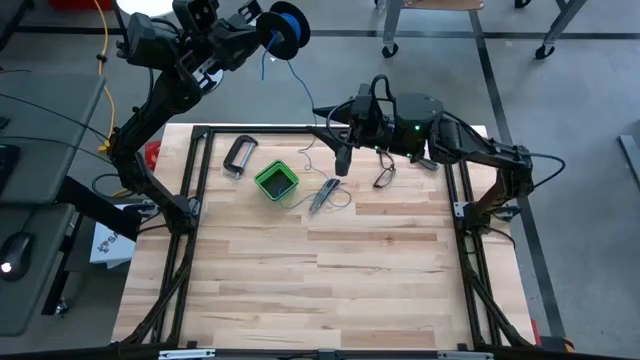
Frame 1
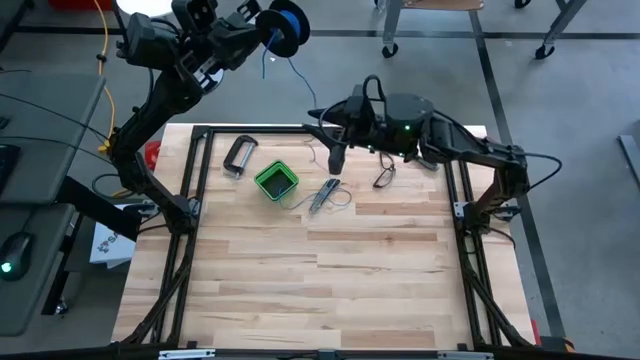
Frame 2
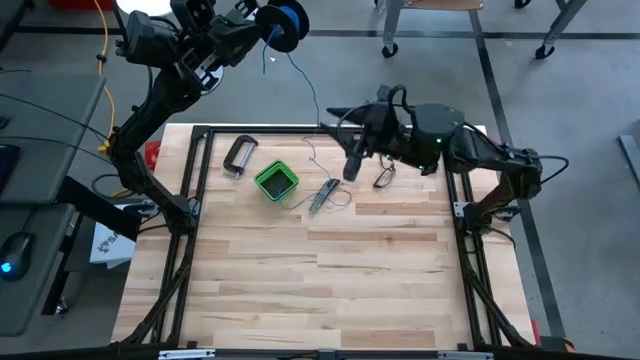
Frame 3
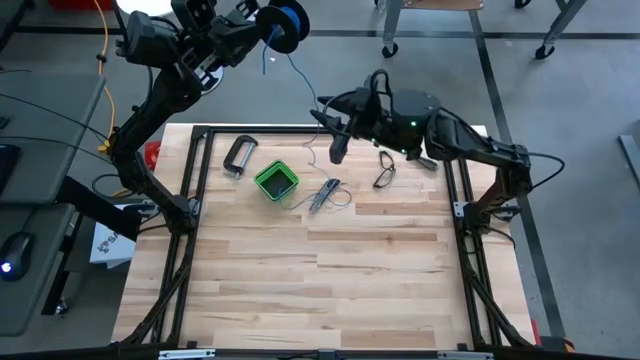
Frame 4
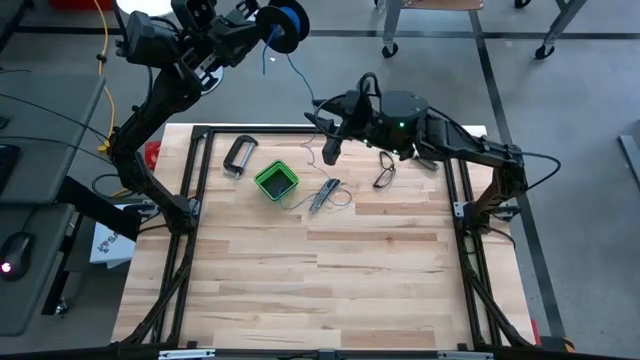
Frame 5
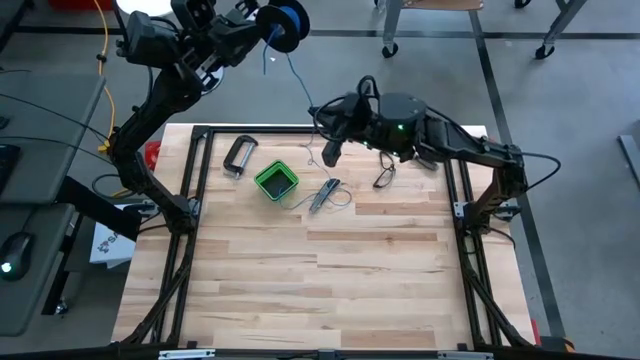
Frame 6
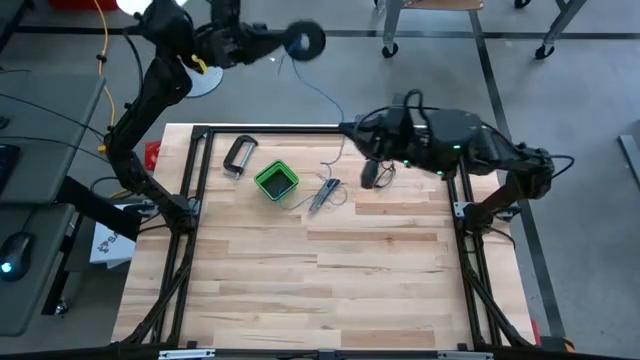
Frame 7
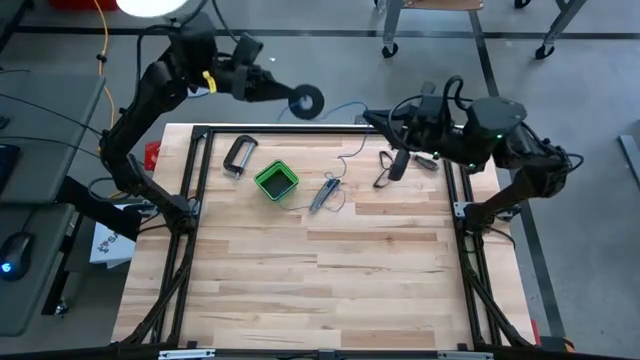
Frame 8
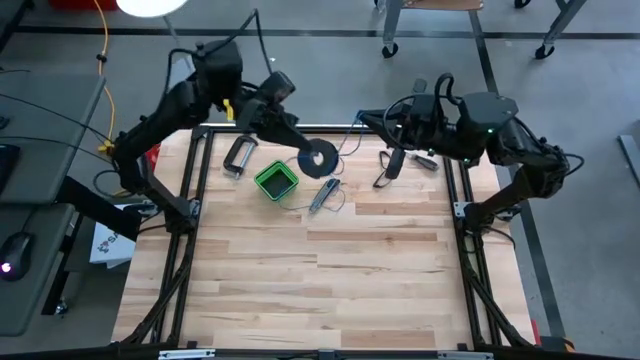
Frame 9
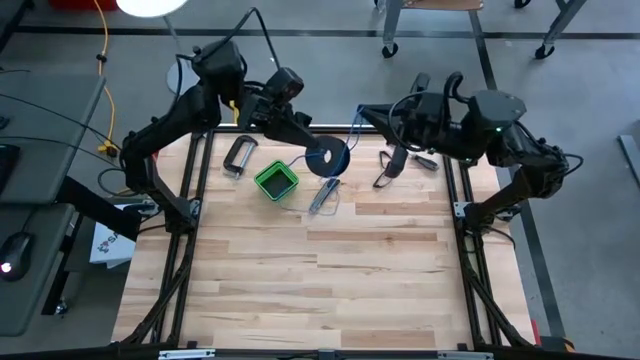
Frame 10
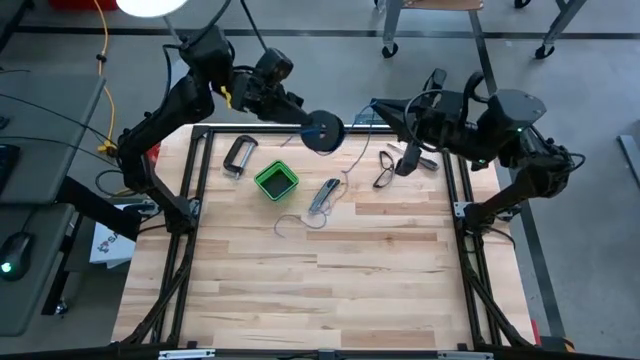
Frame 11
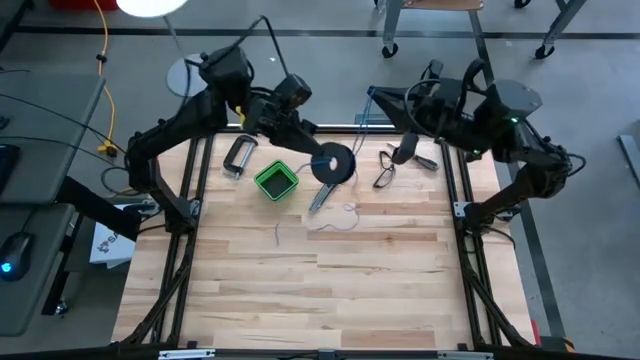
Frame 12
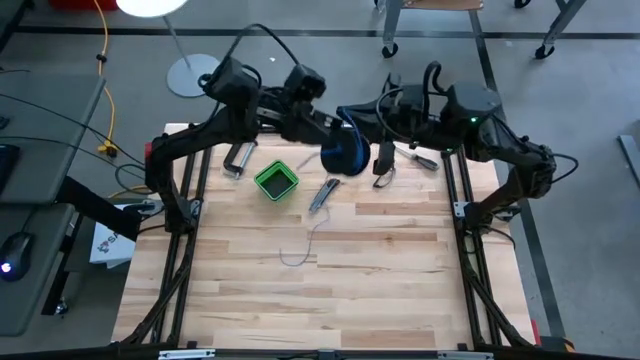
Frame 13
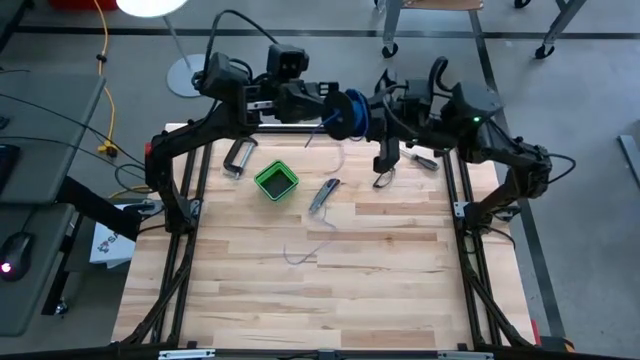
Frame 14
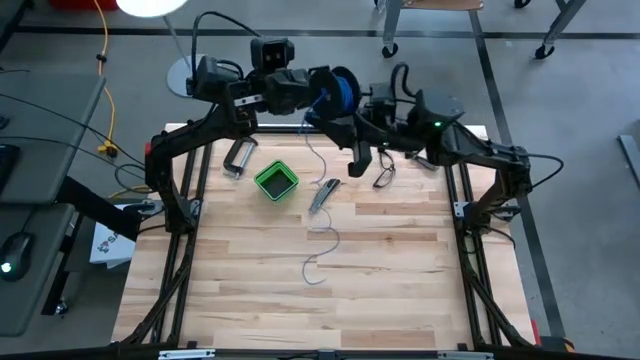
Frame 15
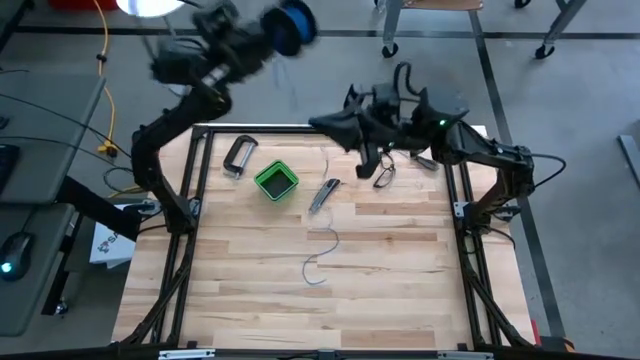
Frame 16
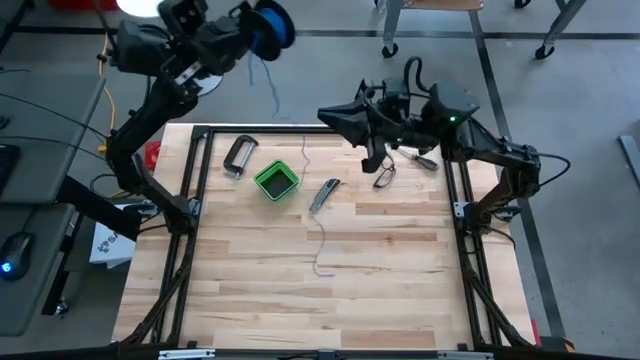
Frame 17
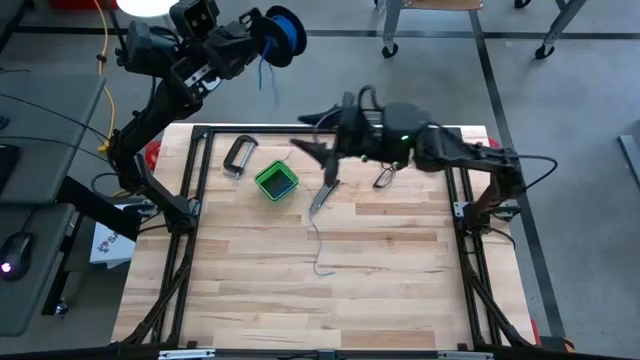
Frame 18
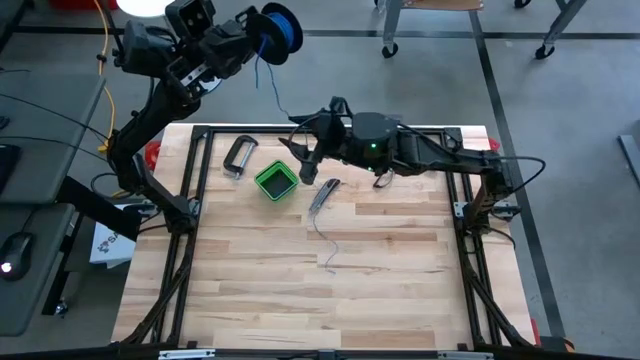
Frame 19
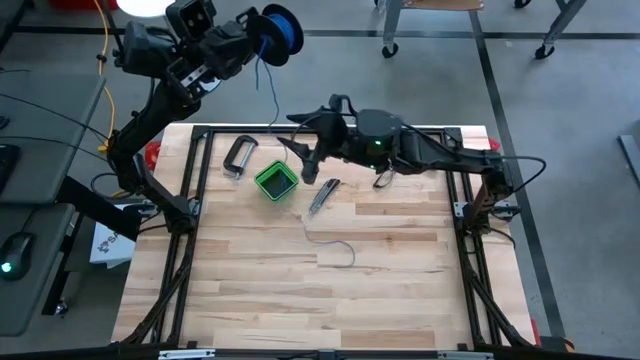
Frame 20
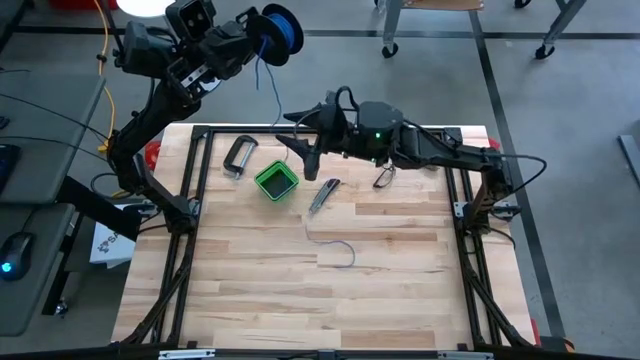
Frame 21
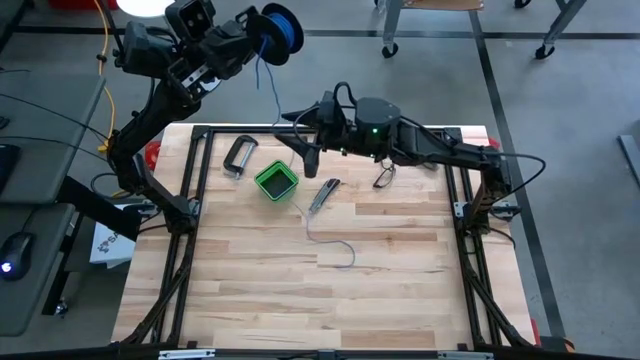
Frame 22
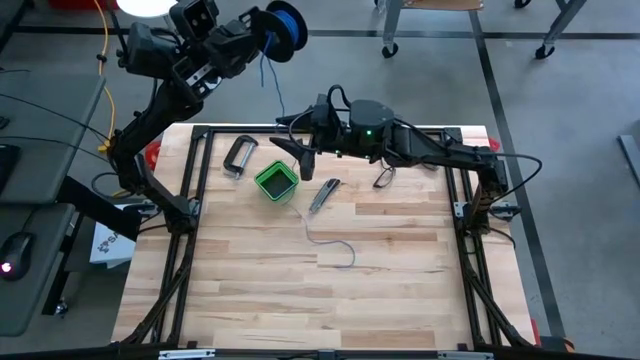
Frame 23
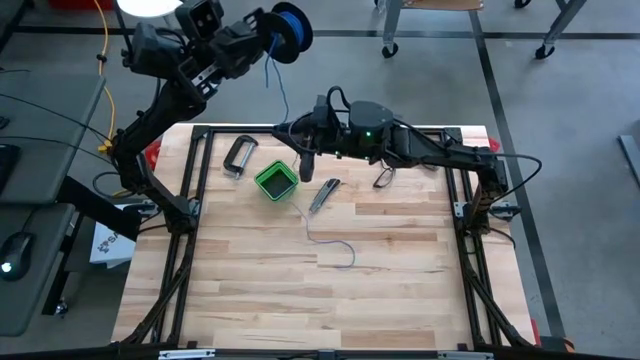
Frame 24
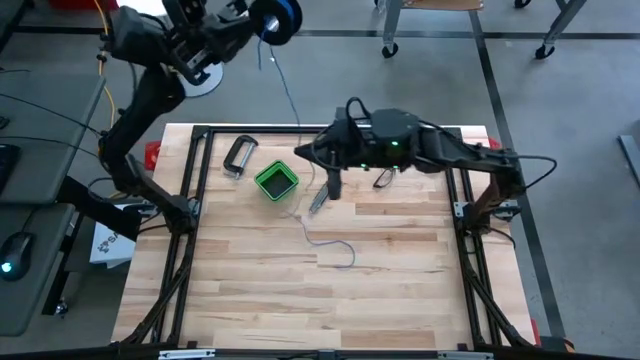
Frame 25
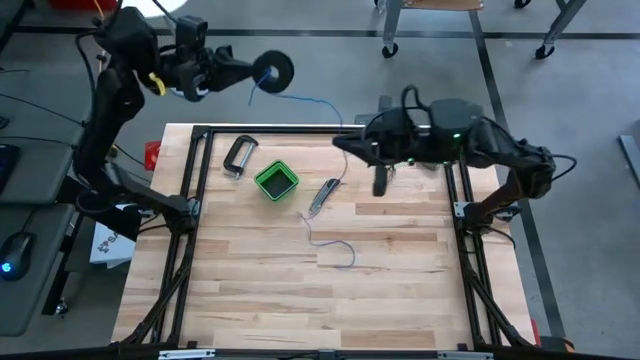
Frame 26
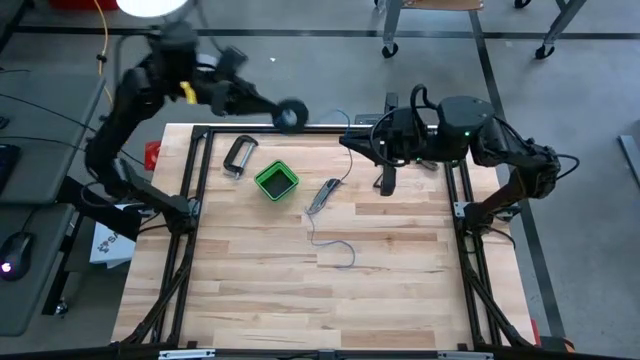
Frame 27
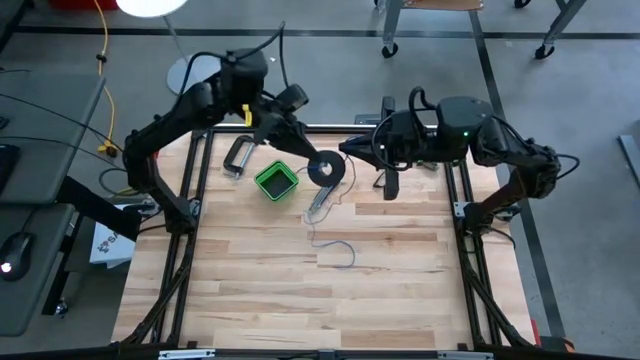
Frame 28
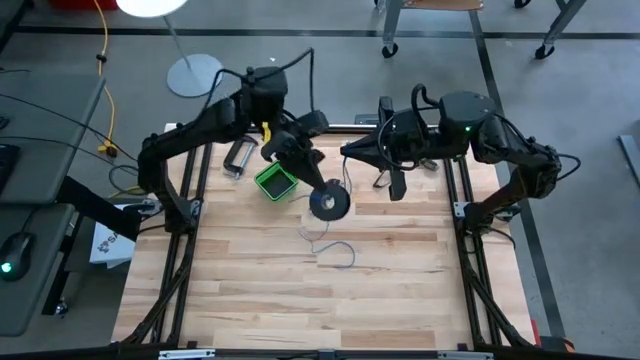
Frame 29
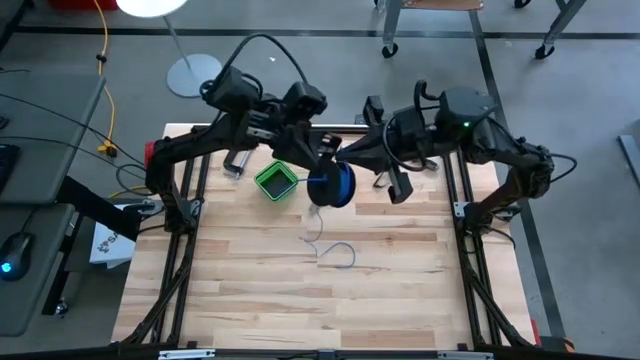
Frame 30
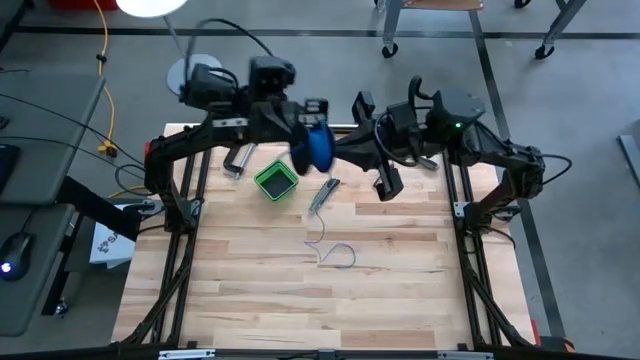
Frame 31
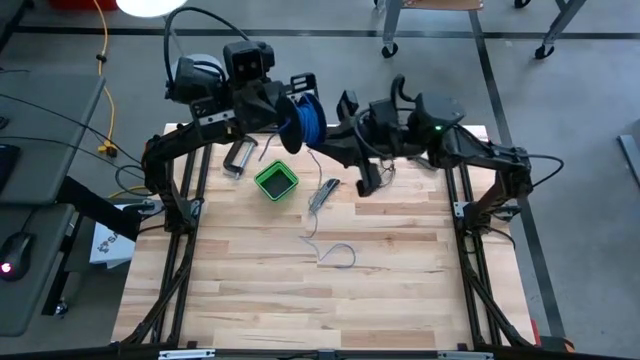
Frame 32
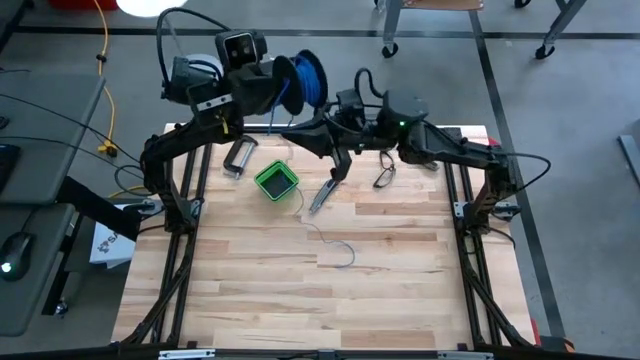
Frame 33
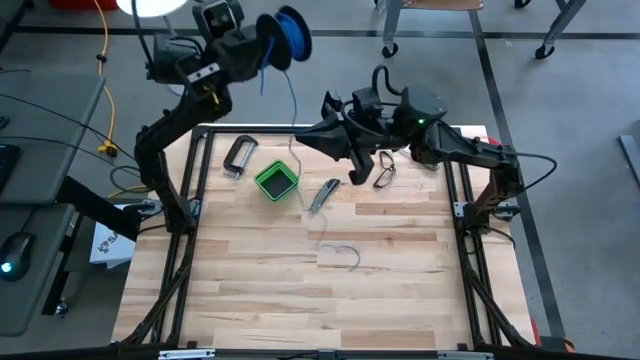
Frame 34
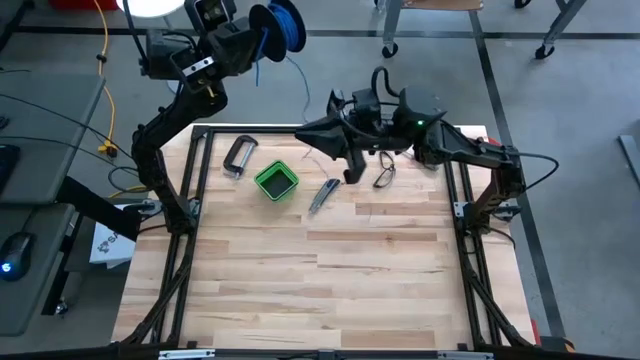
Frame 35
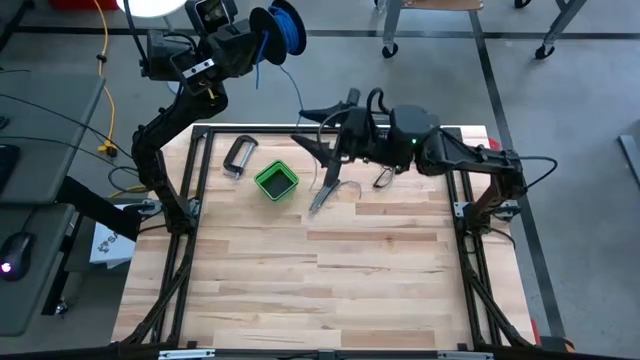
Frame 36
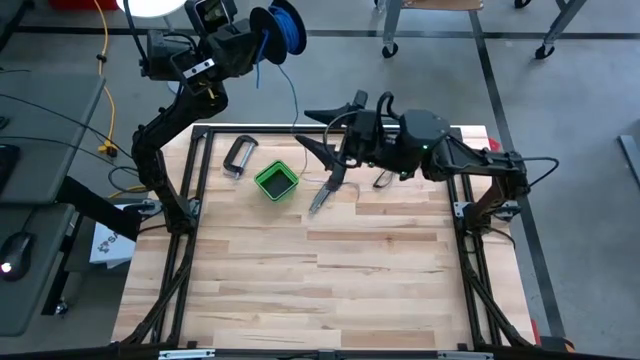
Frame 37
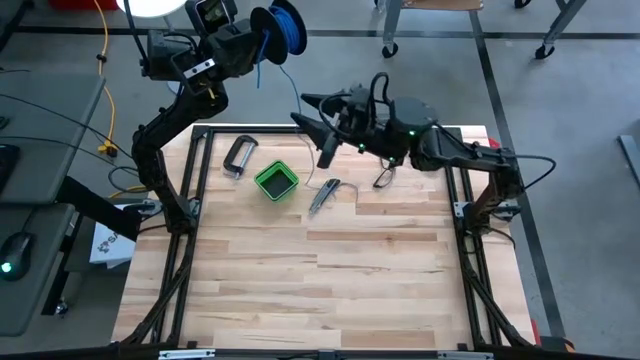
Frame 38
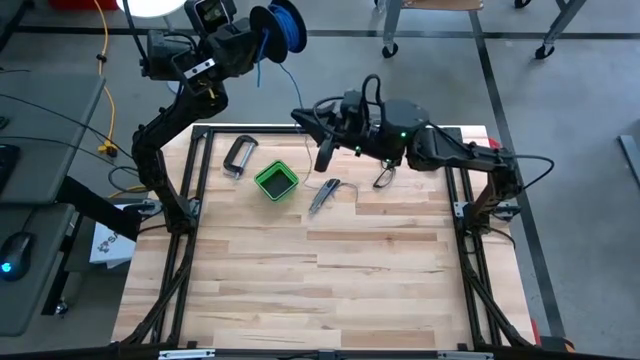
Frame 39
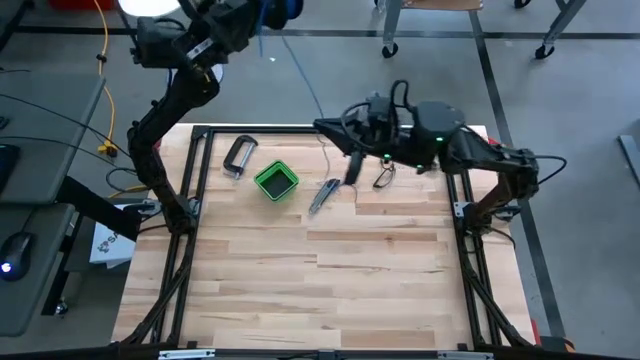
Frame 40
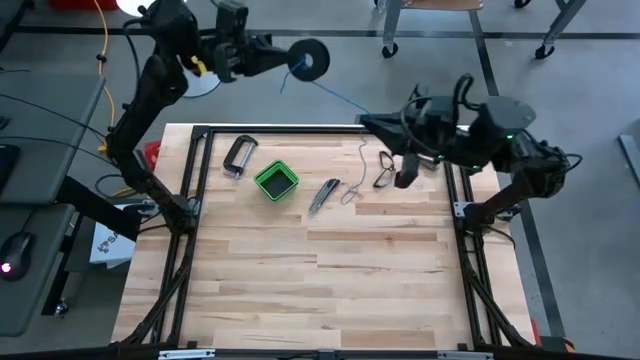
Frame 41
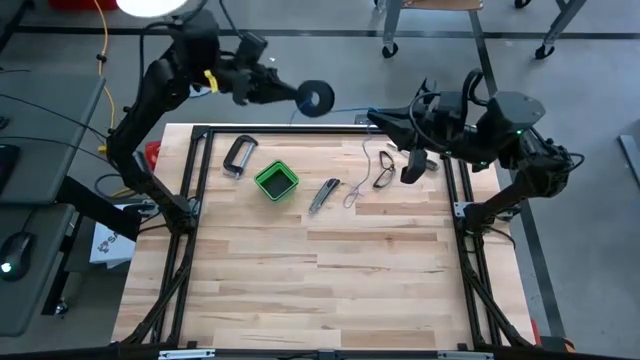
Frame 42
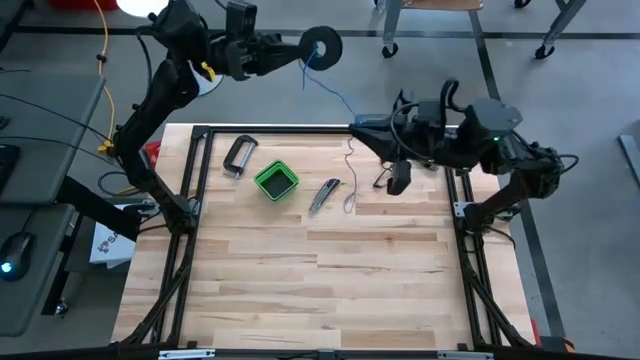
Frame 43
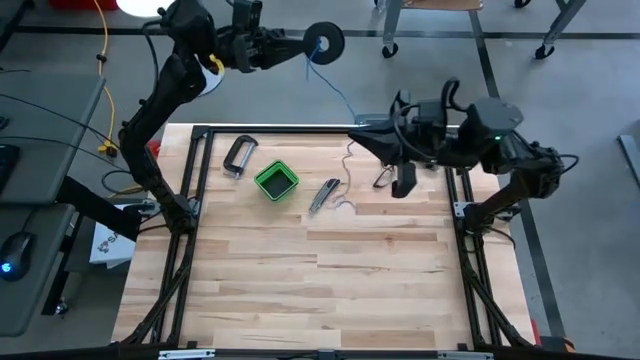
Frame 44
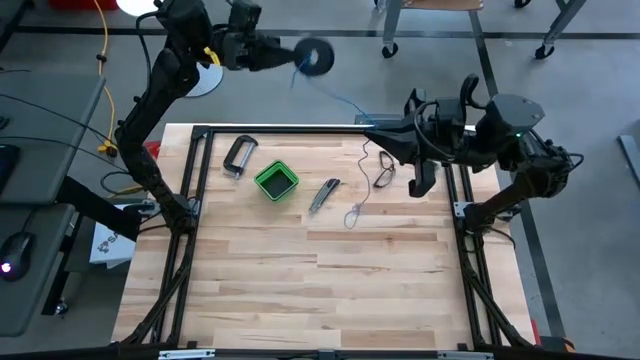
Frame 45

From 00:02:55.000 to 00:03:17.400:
Task: Coil cords
Coil the blue wire onto the spool
